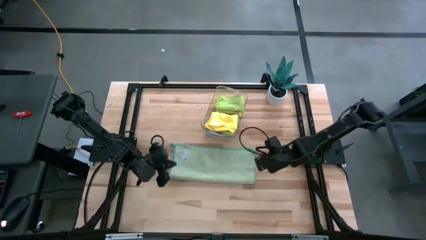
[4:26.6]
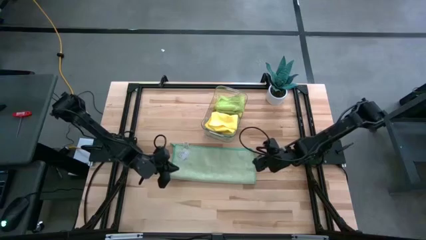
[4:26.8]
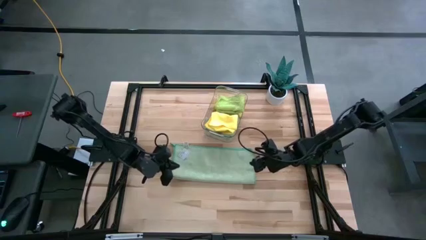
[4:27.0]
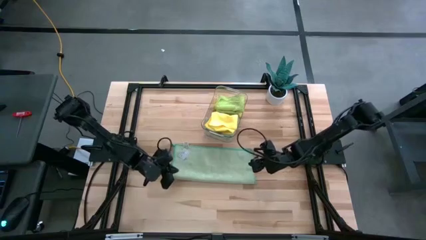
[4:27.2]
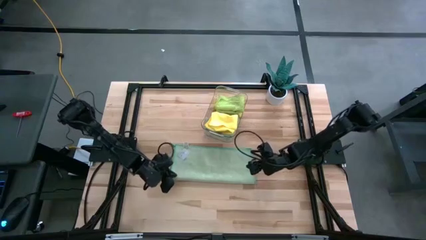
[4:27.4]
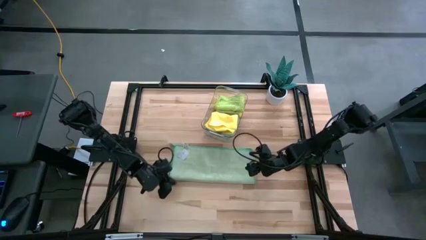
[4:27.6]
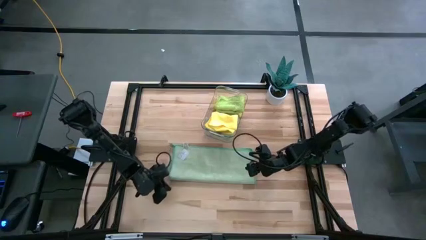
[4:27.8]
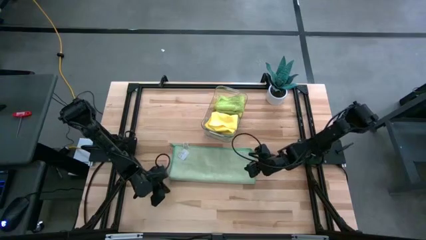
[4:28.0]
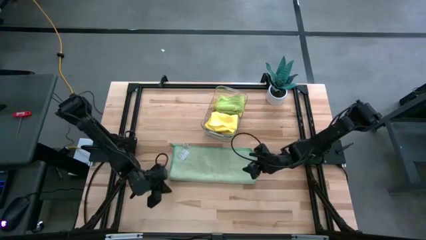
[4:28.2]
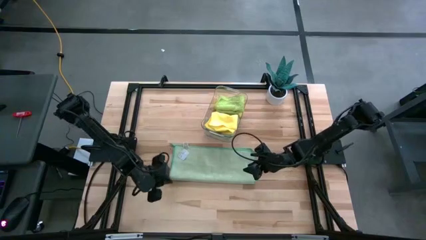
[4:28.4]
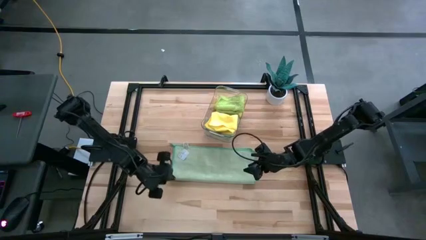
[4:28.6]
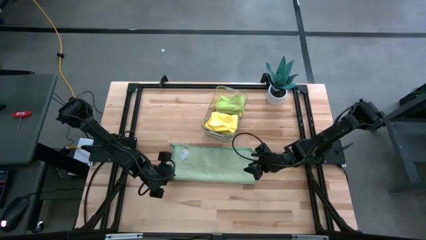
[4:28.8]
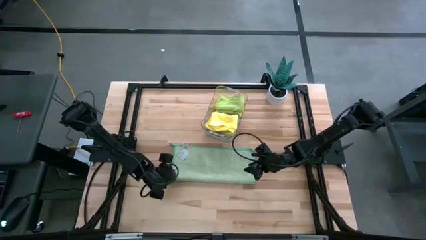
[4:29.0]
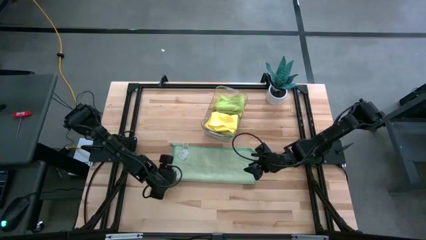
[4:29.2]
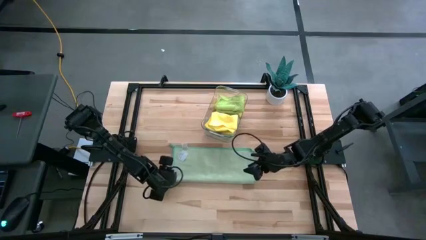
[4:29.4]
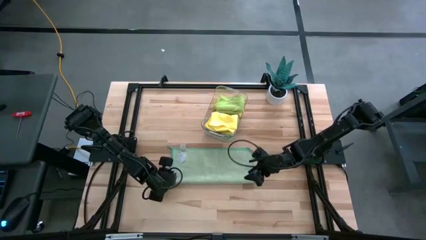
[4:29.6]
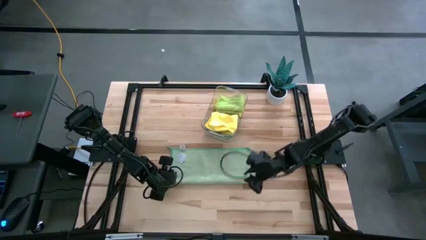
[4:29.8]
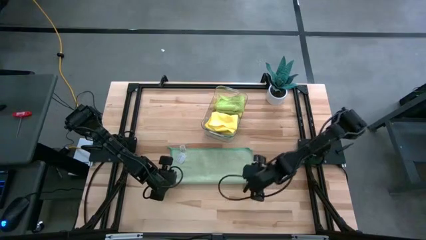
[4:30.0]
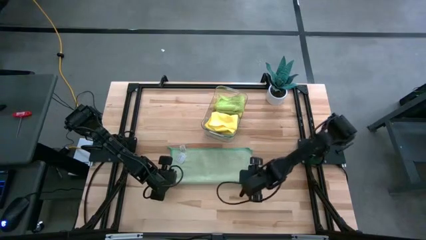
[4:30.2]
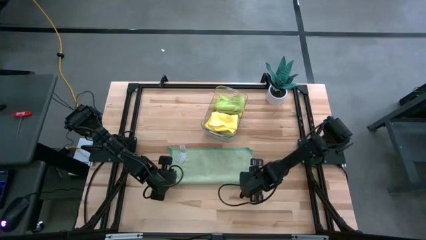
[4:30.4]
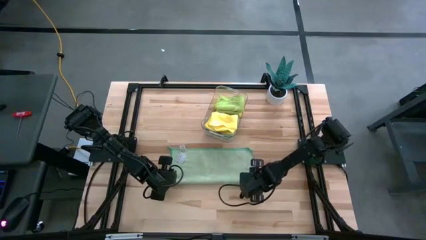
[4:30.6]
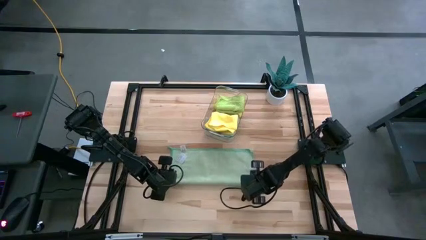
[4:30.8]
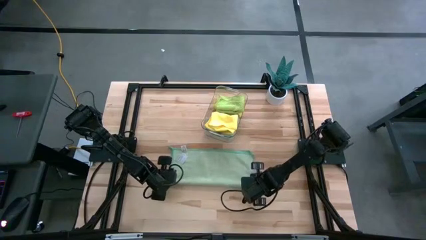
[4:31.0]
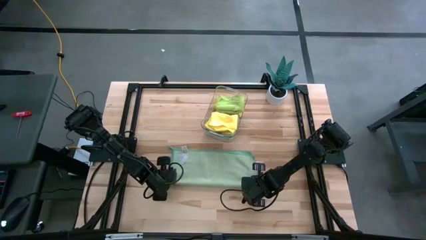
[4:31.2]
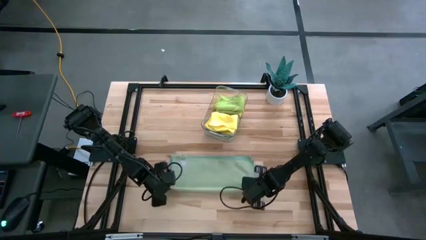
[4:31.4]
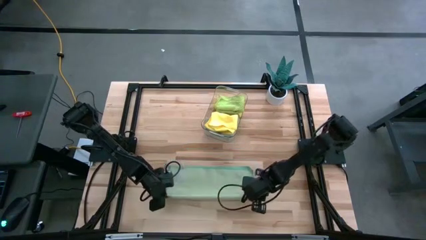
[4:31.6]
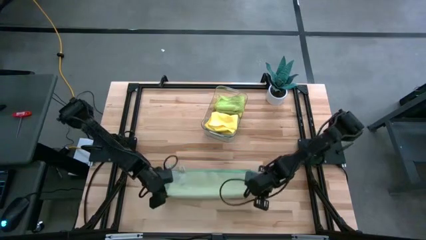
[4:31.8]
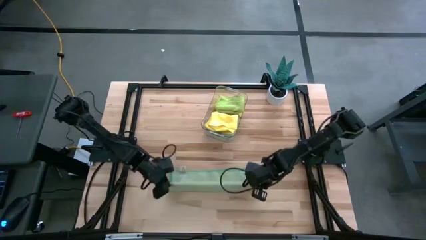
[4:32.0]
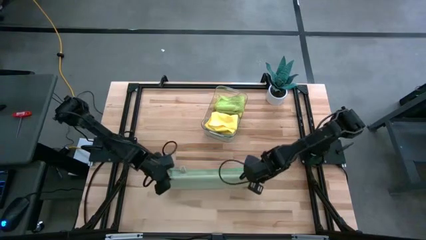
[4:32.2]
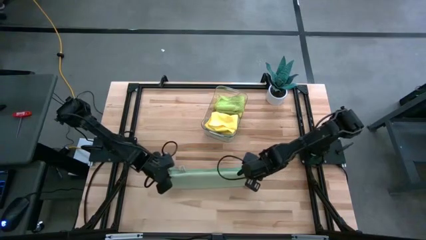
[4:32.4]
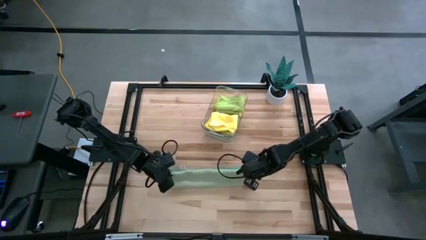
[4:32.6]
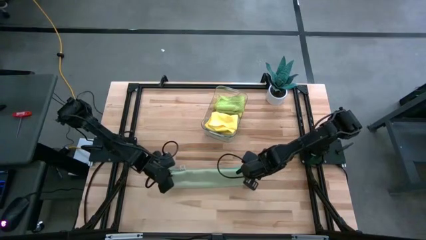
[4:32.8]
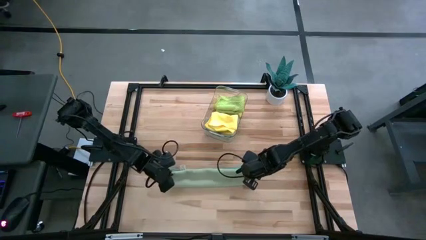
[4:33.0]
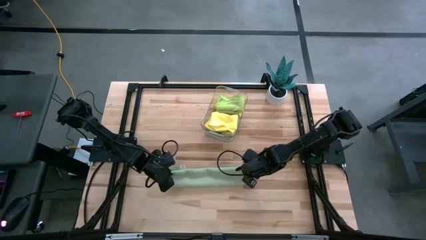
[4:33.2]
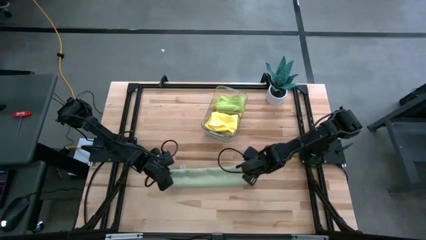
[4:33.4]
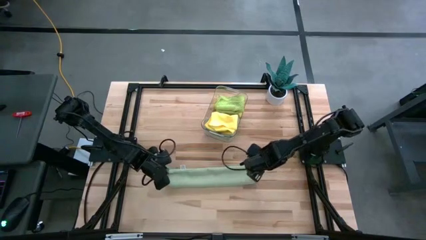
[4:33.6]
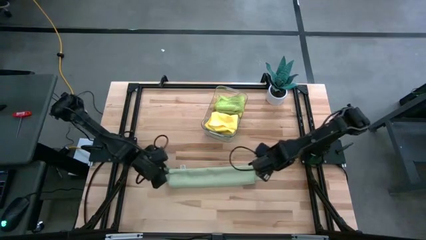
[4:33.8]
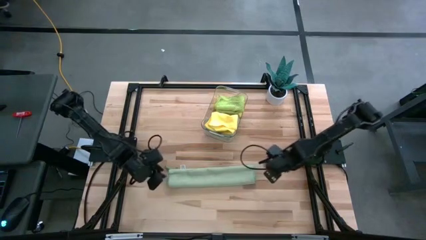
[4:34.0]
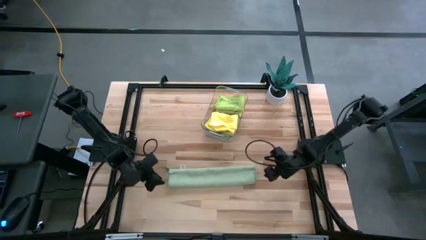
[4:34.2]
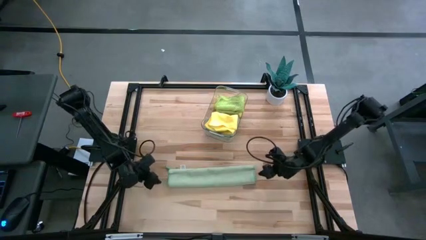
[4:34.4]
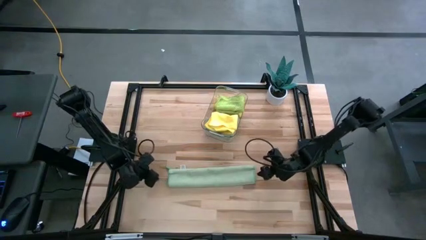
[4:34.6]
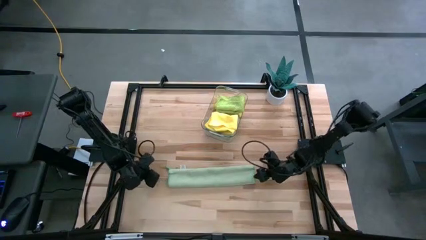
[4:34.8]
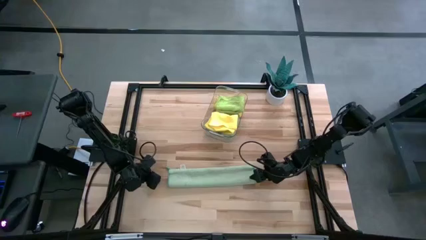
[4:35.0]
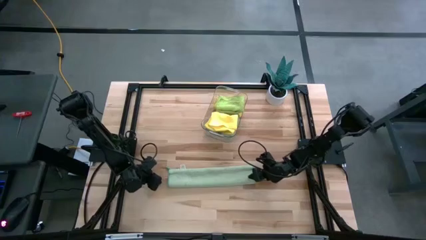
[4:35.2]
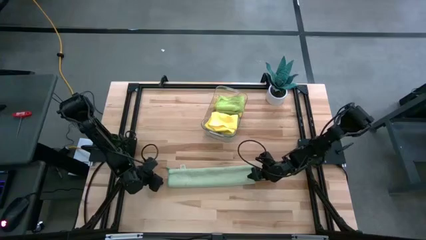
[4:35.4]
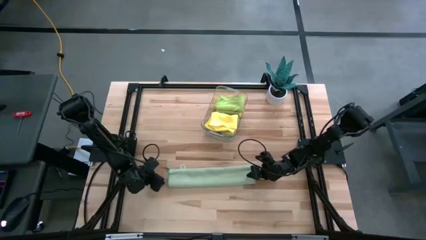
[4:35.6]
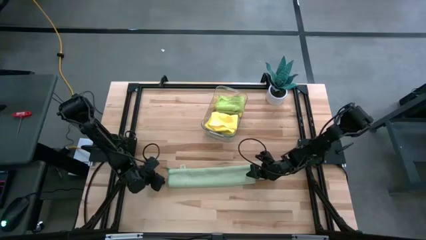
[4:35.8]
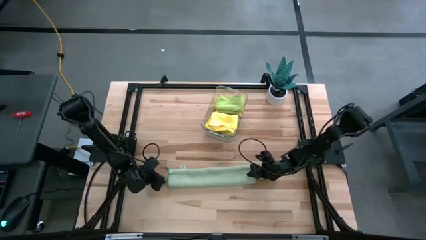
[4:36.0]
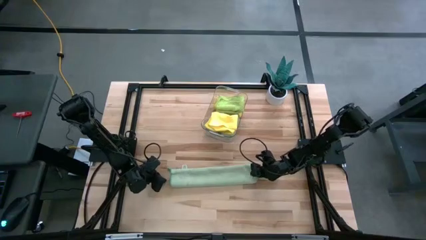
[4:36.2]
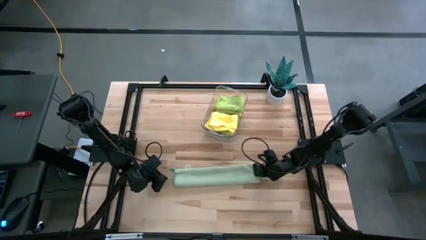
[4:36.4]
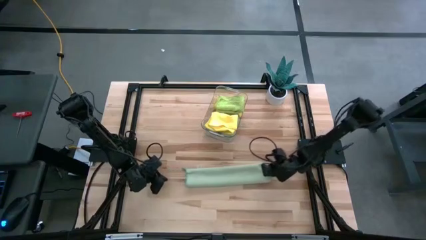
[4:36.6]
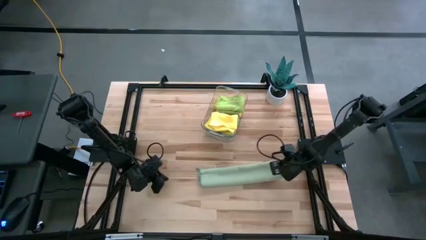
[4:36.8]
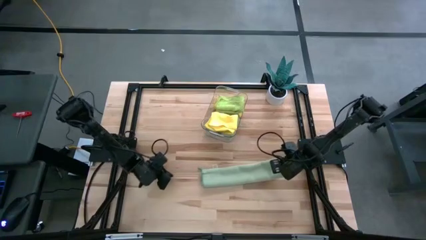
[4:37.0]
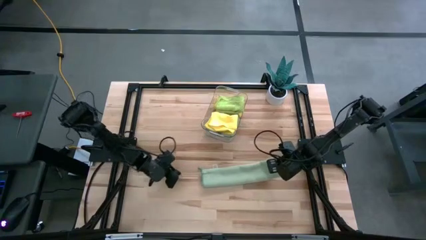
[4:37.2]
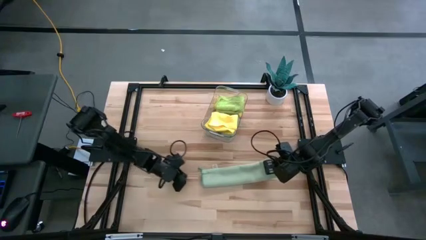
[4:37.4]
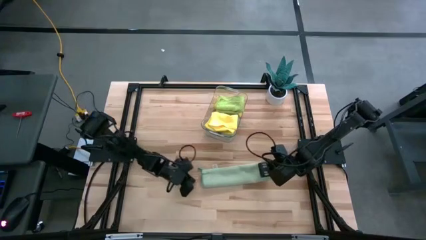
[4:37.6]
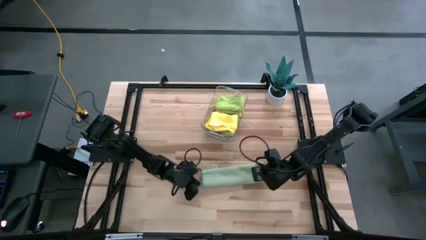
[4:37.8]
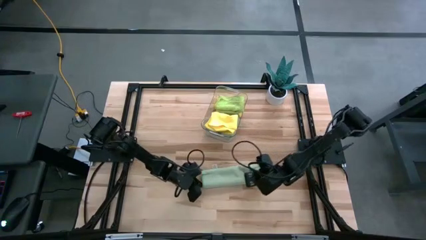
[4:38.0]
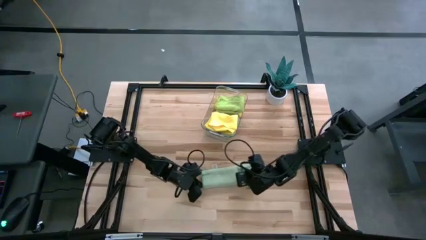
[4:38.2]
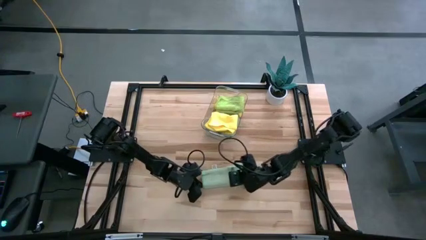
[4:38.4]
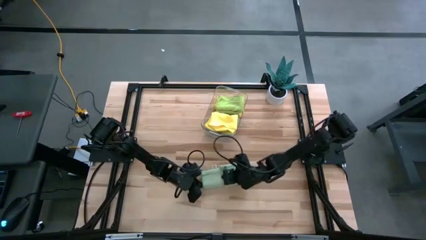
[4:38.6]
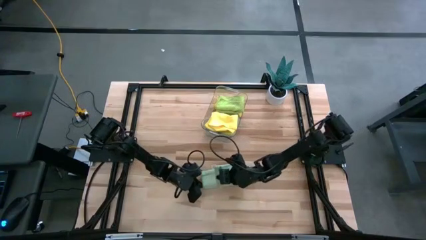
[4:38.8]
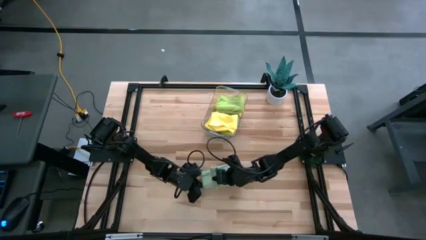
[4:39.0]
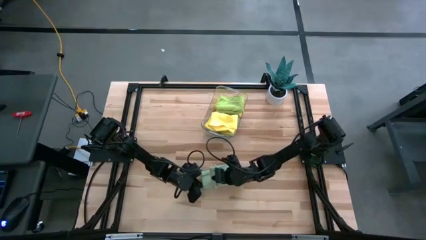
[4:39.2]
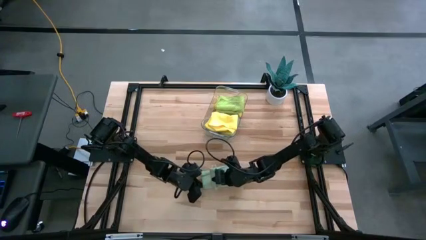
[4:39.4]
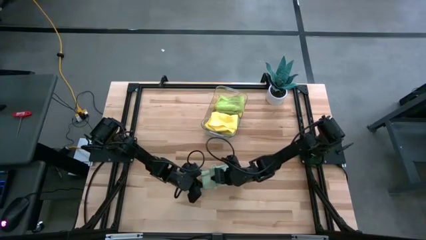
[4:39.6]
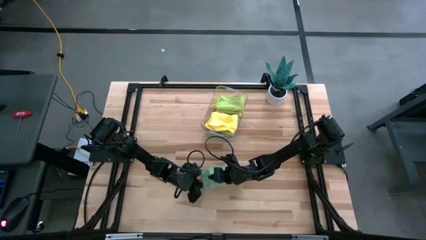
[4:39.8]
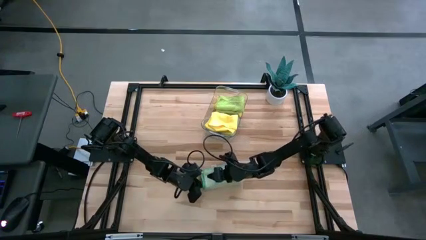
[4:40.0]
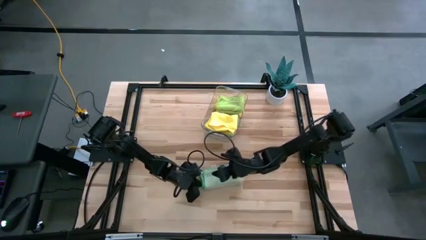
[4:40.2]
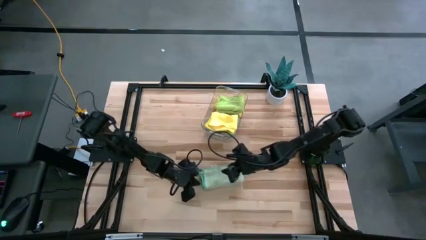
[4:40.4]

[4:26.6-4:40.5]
Task: Fold microfiber towels
Fold the blue towel

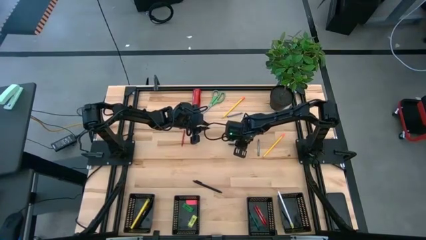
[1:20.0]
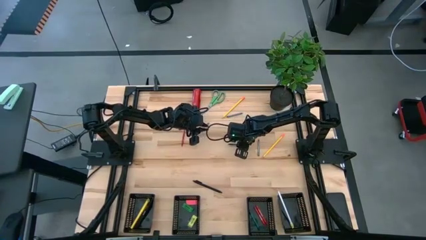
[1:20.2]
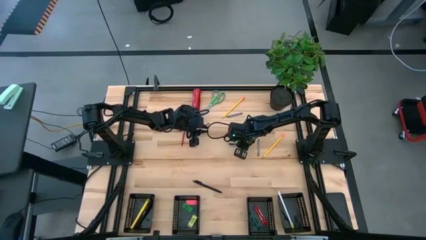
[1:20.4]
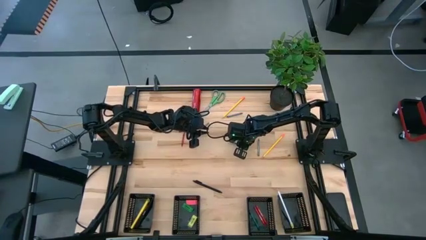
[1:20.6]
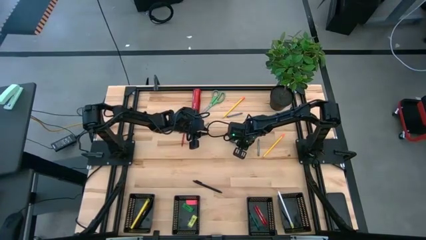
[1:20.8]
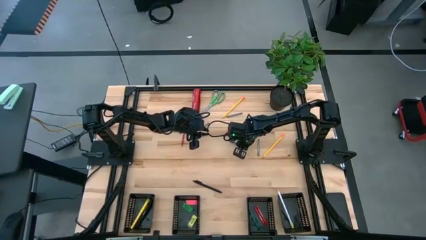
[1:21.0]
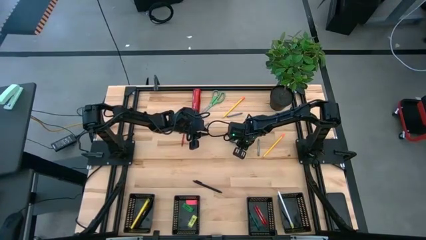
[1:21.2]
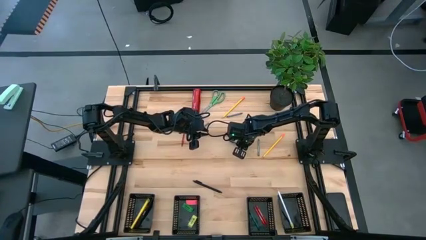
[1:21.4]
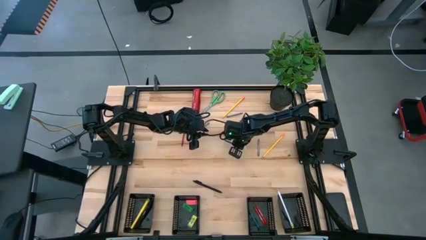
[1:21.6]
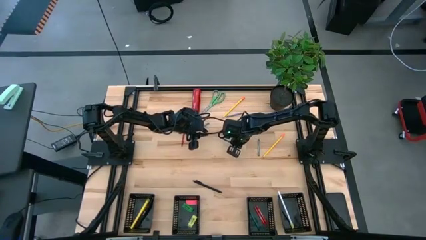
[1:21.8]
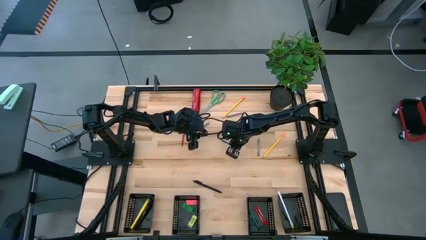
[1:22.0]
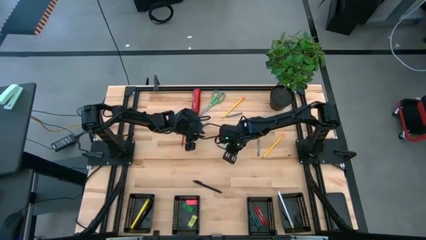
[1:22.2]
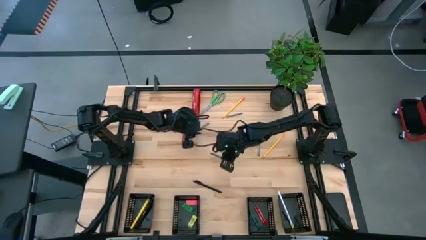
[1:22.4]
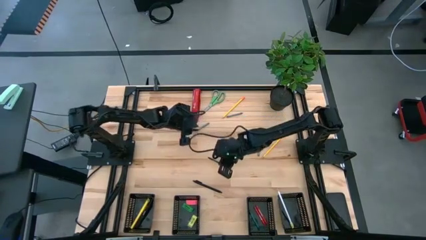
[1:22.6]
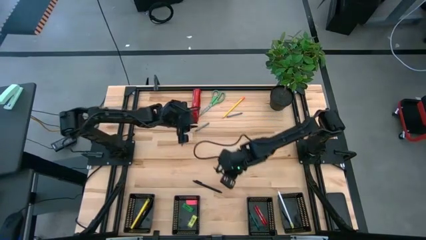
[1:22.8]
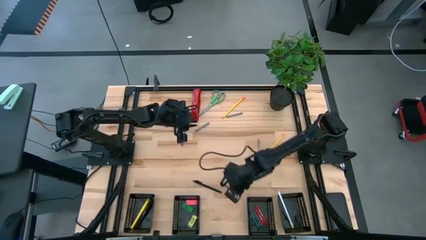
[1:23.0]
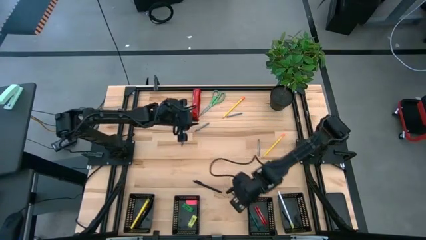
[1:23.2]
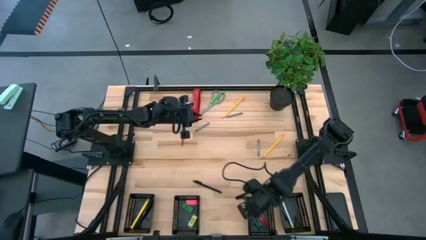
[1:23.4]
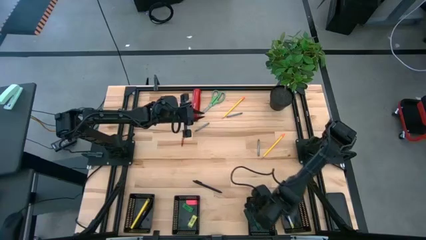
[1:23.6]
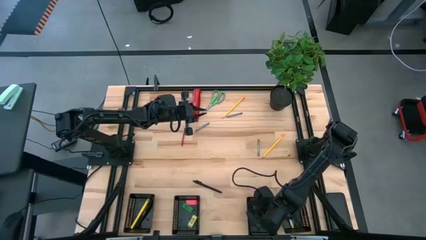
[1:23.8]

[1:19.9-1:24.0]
Task: Sort crayons/erasers/pens/pencils in bins
Put the green crayon into the middle right black bin
